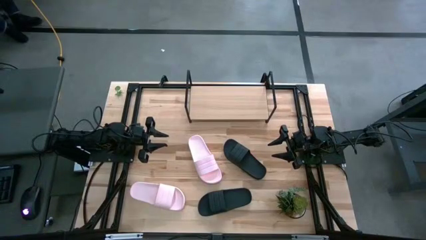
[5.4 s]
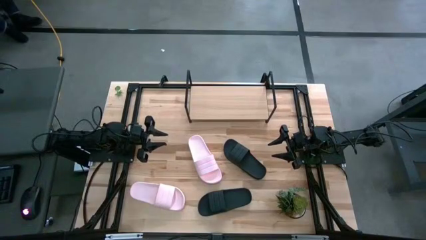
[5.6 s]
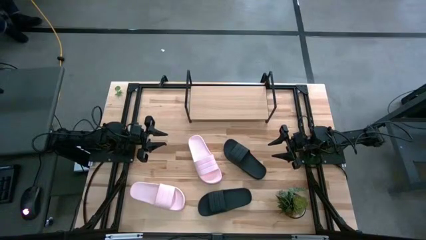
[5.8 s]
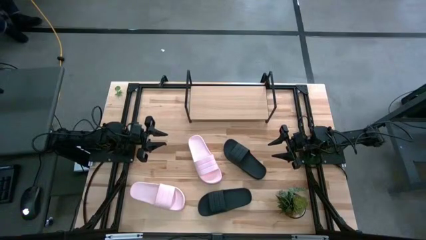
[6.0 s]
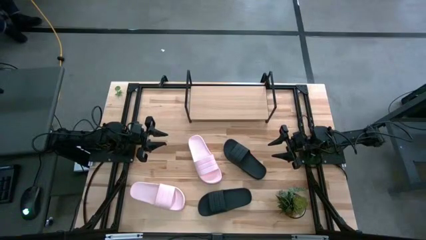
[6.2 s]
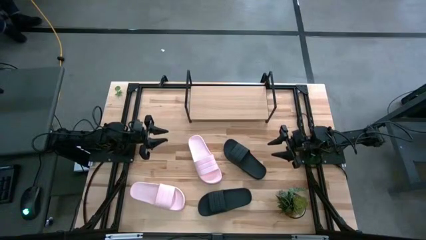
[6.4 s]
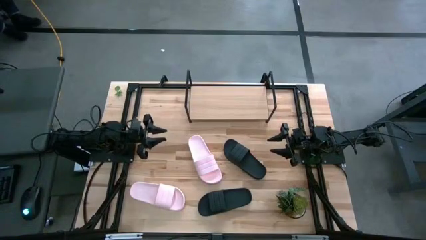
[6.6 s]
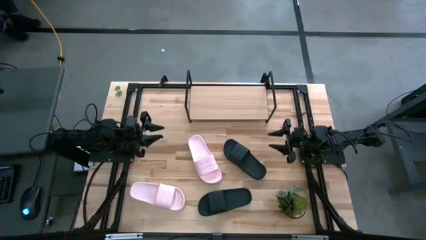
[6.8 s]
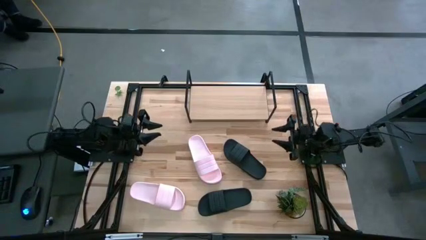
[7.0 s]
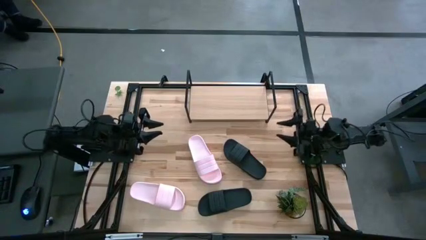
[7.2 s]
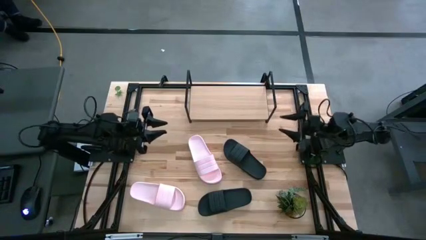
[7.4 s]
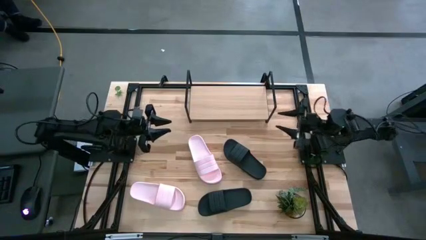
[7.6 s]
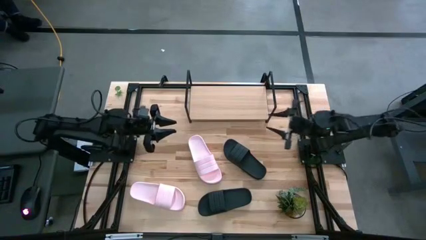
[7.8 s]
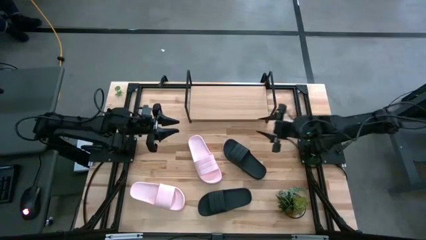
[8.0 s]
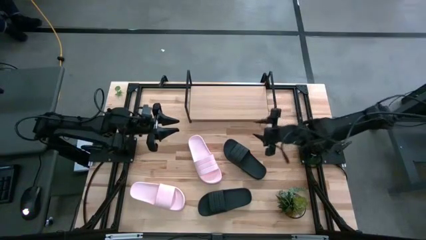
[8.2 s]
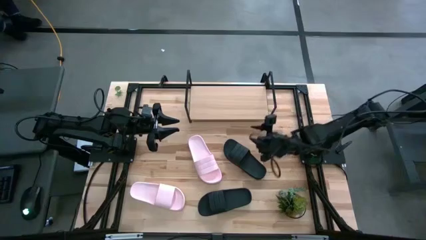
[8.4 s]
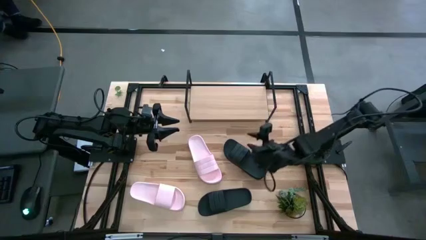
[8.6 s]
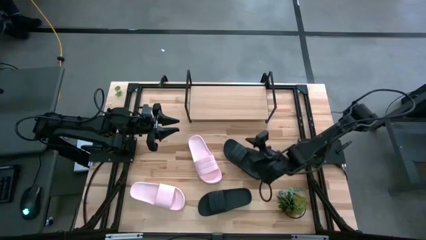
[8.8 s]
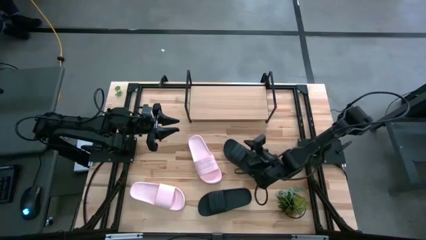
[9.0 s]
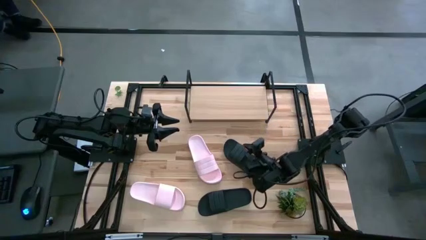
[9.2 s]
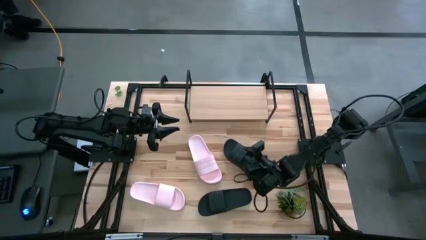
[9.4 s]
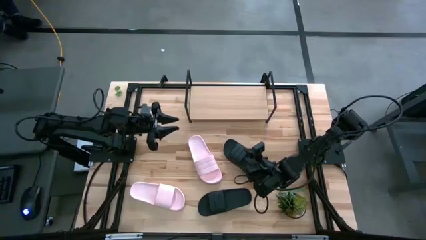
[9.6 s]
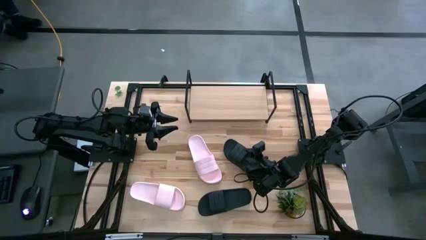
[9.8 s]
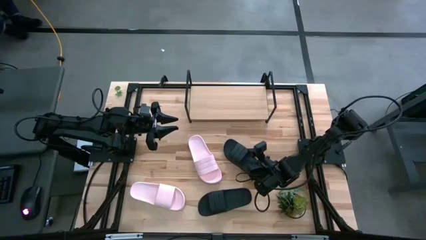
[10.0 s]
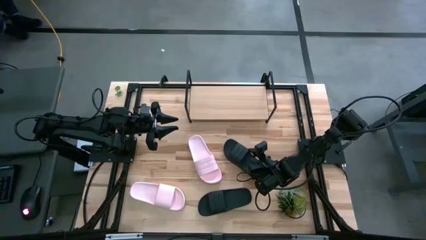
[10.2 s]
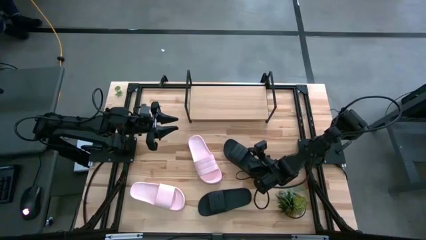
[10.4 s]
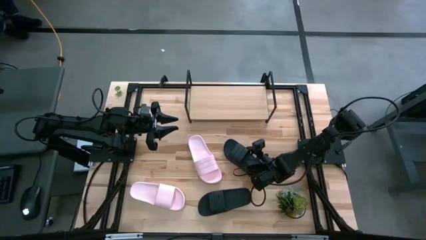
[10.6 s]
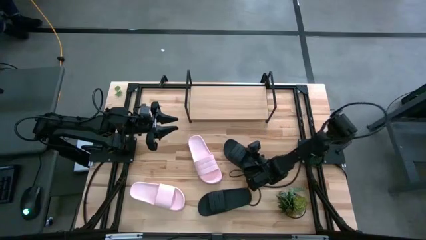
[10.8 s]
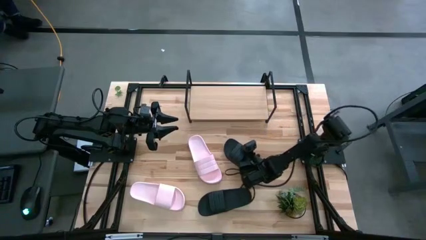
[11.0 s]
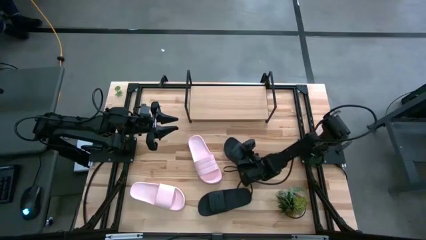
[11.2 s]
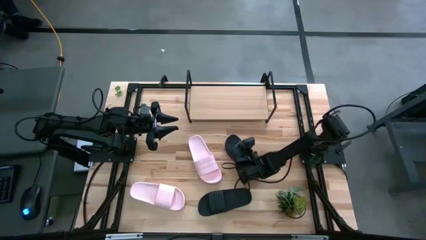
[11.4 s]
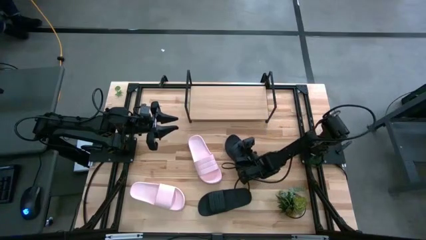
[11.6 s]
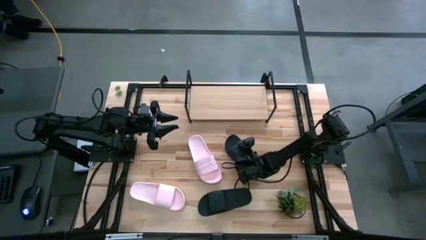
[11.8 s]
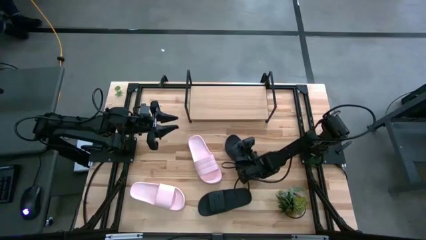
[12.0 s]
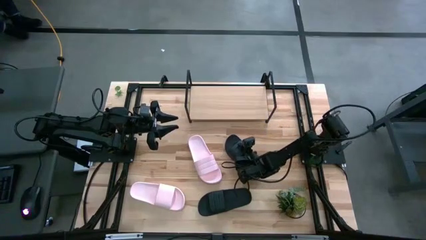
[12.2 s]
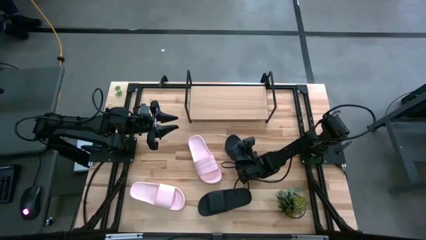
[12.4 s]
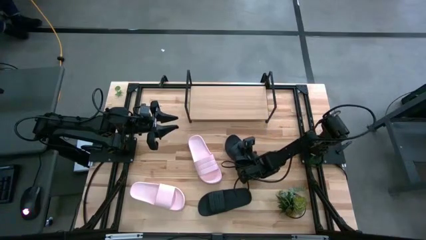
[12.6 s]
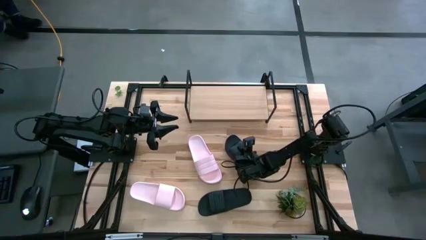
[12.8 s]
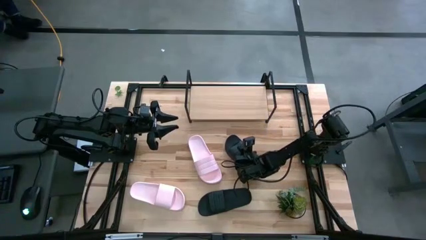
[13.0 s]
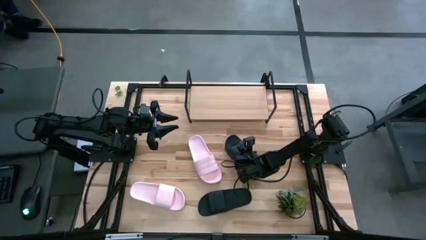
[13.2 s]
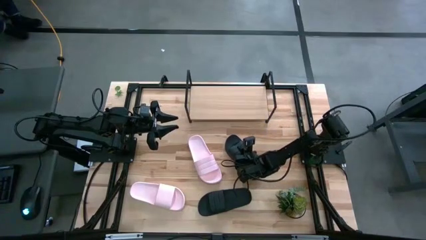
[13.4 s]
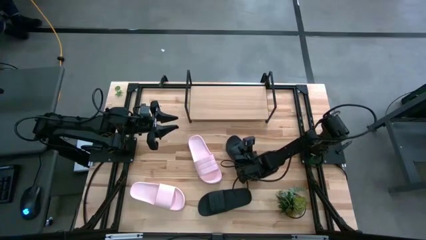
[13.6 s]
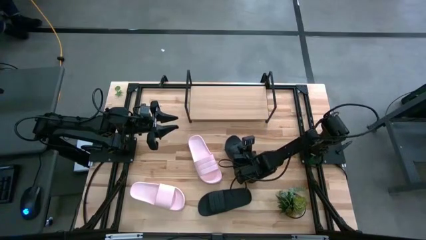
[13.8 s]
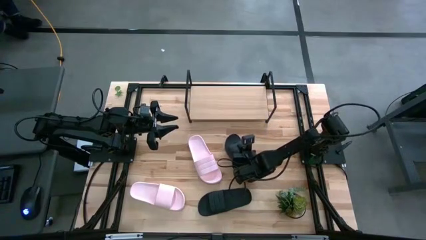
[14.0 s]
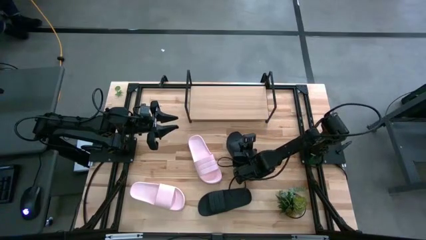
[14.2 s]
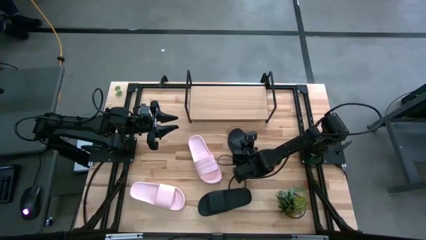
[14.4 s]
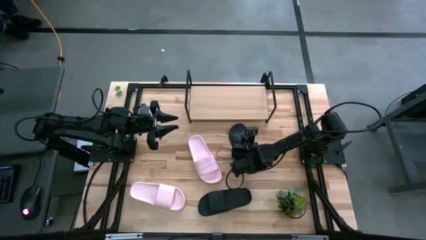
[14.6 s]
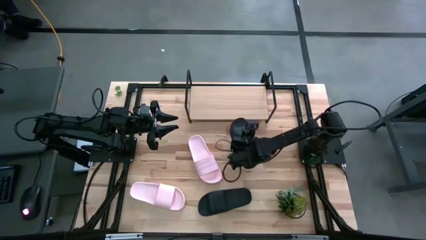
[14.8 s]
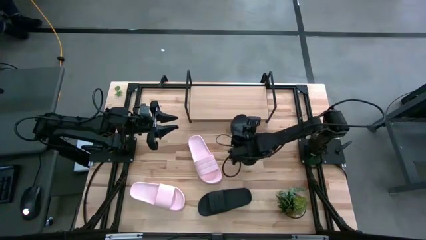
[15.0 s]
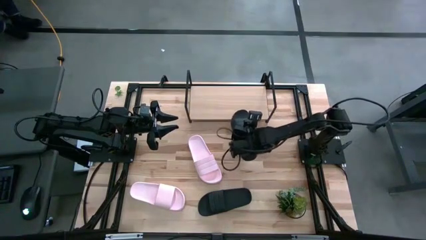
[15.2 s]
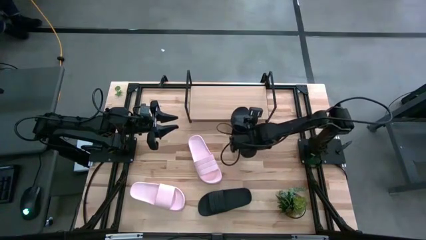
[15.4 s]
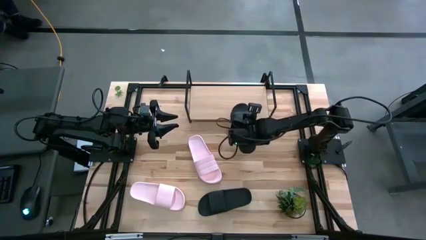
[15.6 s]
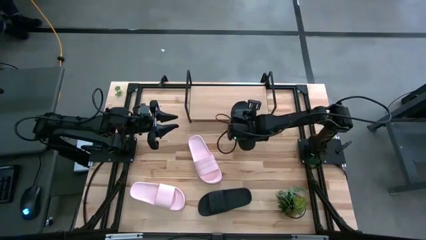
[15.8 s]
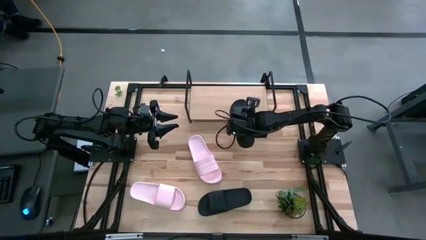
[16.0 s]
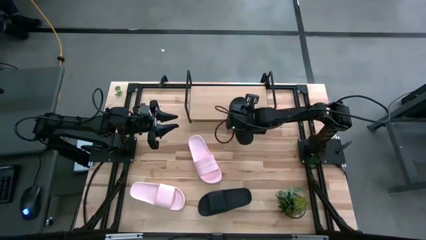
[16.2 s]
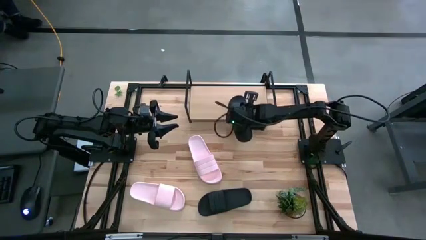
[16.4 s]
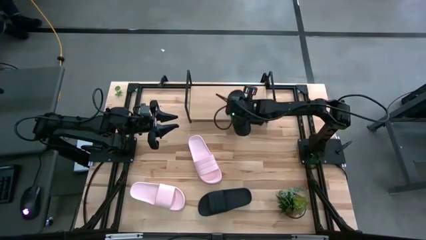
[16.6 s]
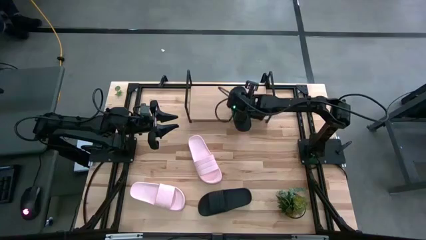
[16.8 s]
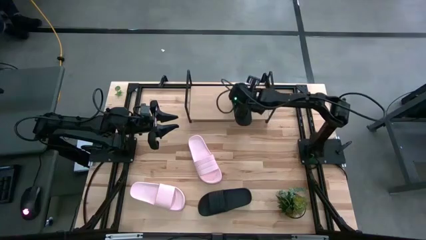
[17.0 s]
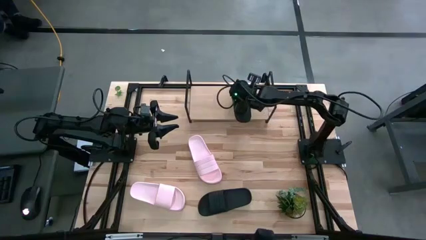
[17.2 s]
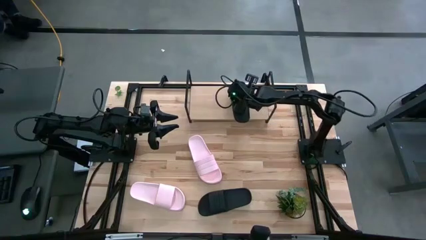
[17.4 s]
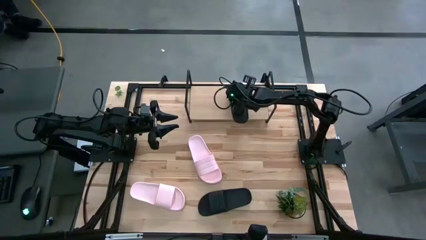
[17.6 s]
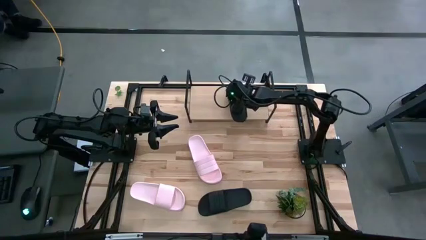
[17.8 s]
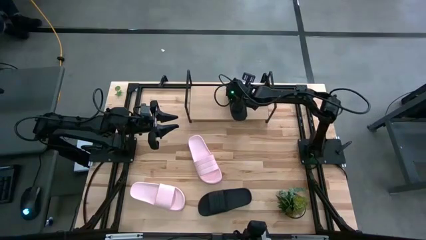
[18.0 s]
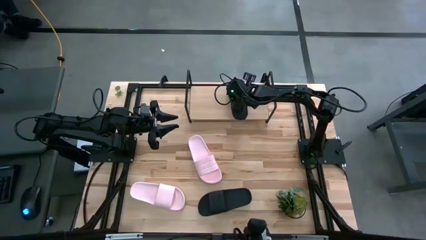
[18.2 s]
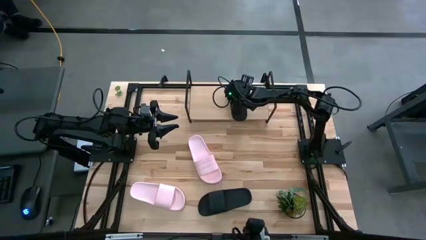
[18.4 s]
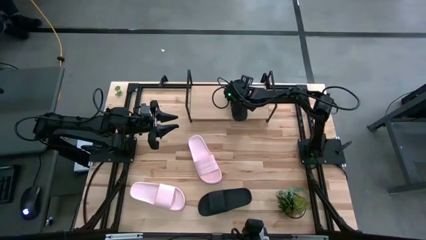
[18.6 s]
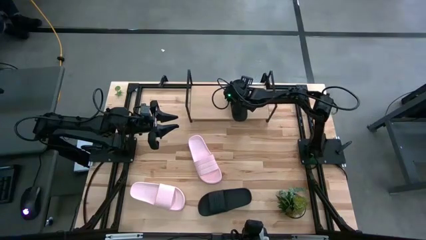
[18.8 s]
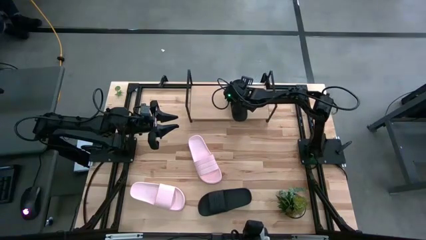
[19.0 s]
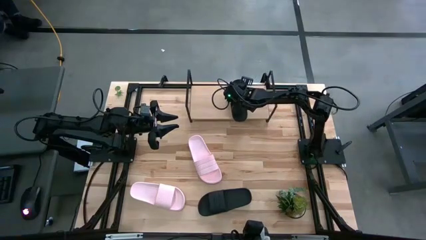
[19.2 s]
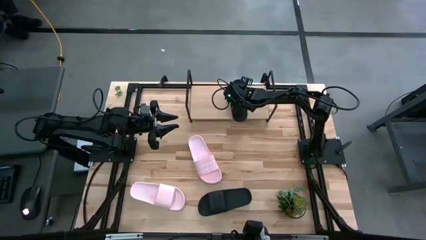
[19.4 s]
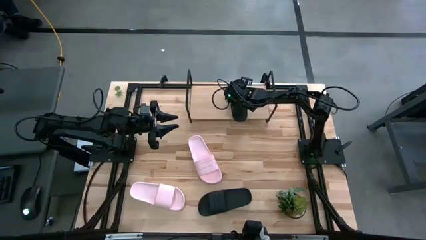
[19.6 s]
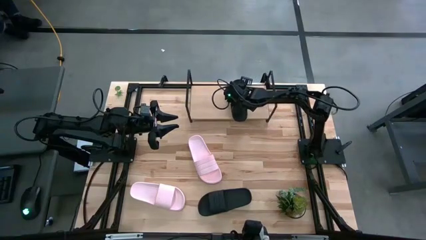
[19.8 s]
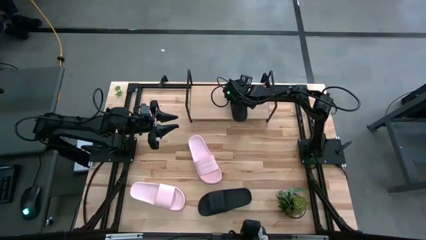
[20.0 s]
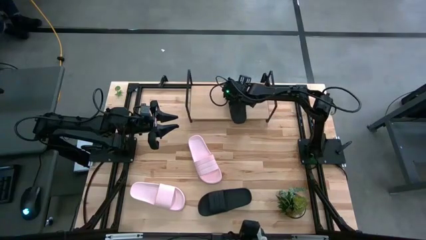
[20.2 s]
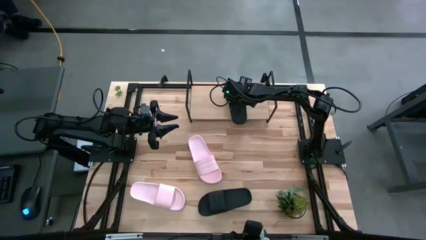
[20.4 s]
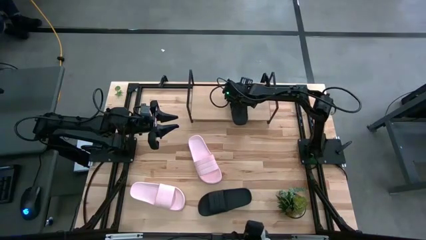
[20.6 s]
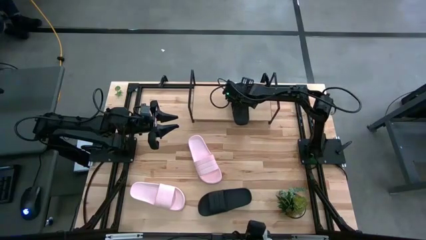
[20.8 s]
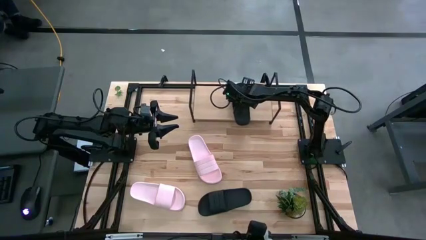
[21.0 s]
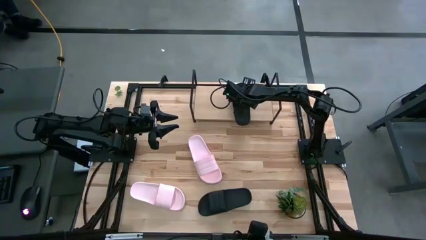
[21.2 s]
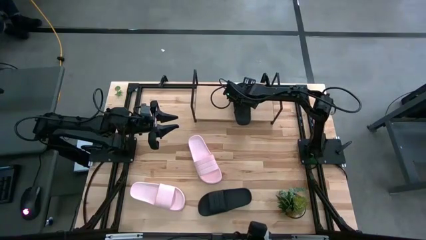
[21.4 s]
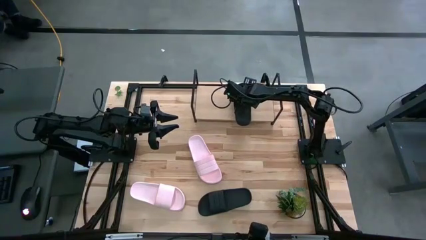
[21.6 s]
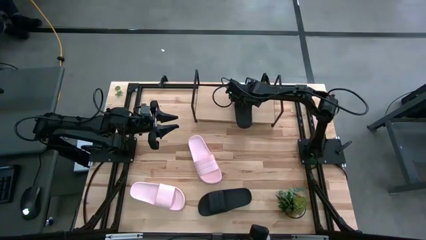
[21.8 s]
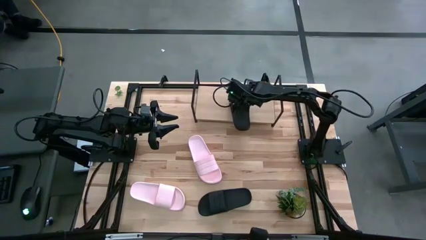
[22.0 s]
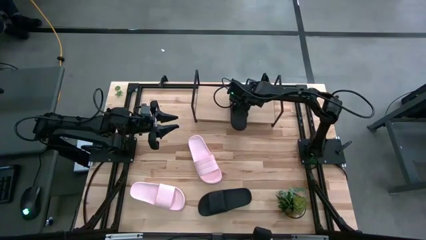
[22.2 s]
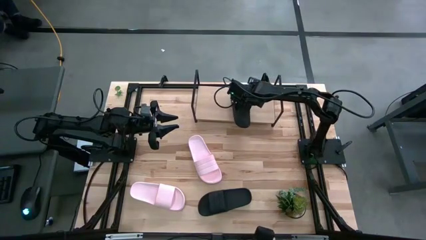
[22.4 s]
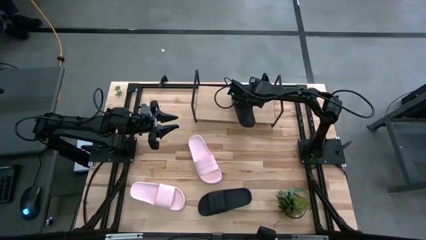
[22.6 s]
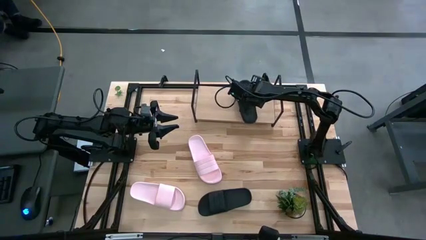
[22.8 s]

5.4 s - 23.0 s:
Task: Pick and place slides into the shelf
Put the top black slides on the shelf
